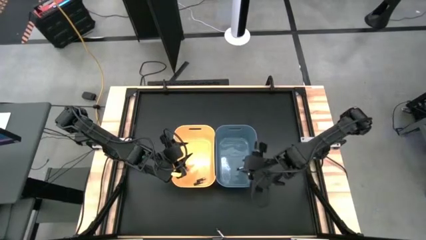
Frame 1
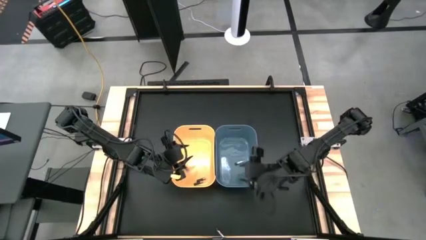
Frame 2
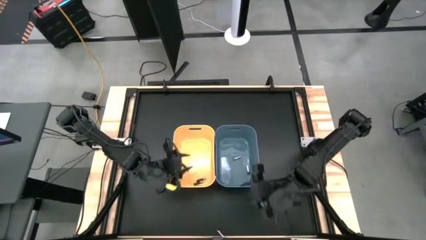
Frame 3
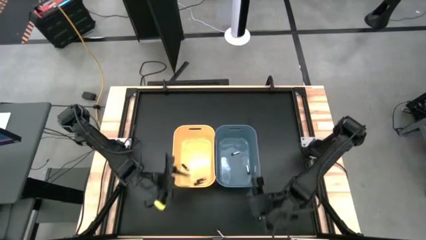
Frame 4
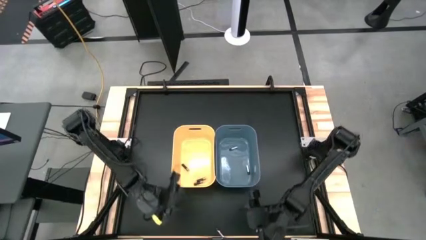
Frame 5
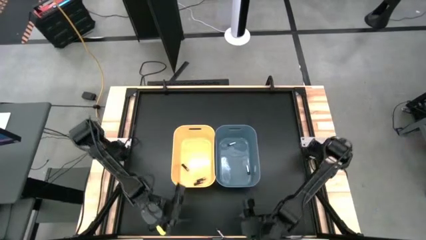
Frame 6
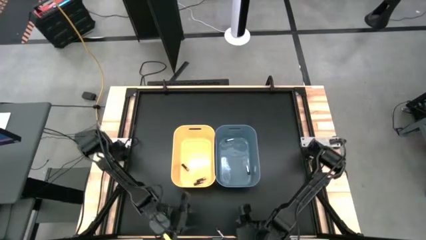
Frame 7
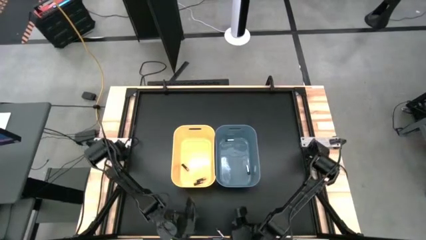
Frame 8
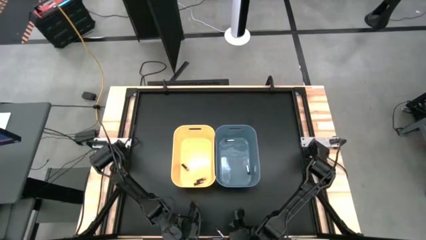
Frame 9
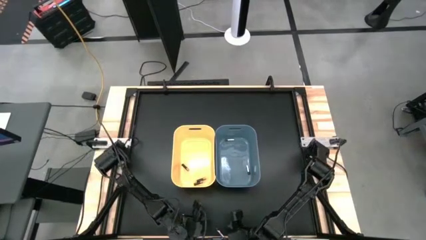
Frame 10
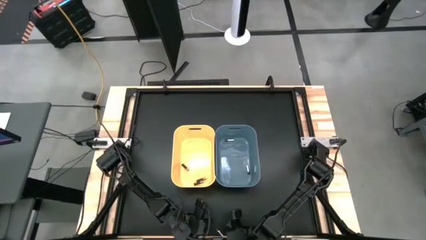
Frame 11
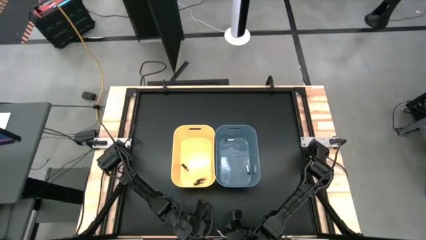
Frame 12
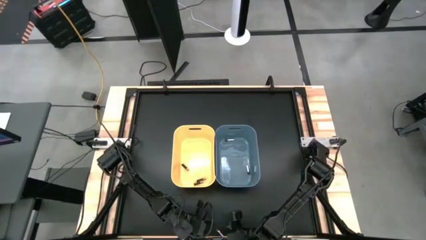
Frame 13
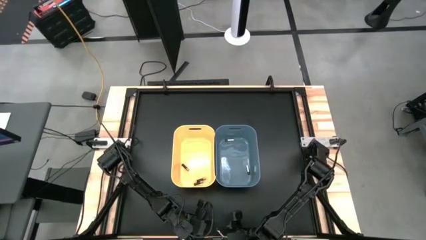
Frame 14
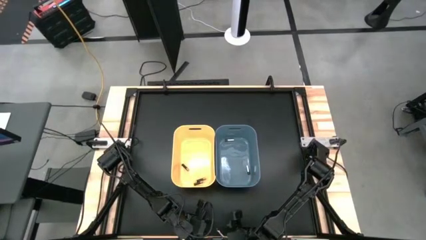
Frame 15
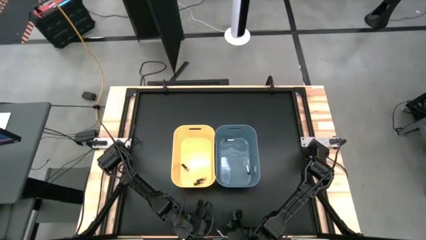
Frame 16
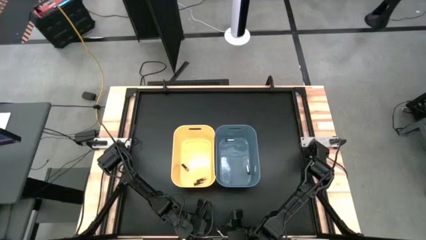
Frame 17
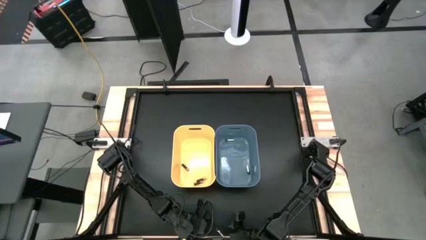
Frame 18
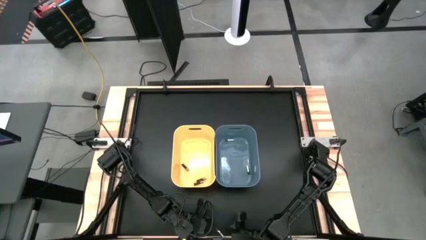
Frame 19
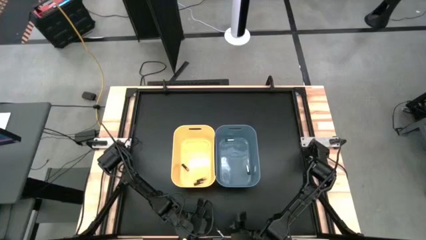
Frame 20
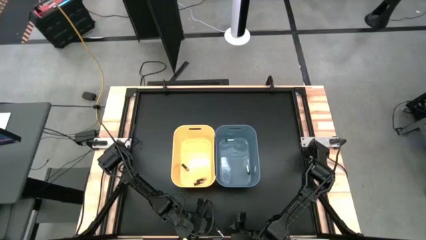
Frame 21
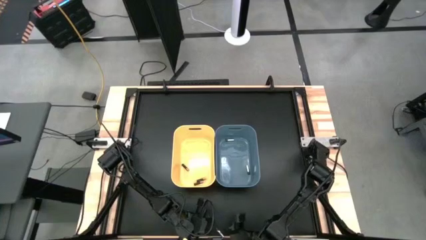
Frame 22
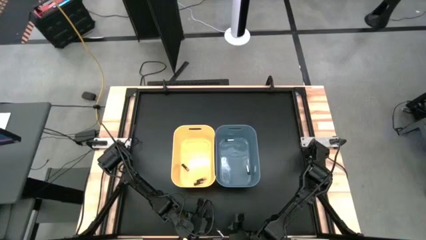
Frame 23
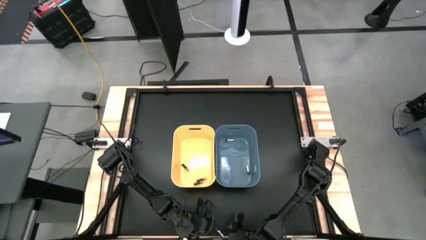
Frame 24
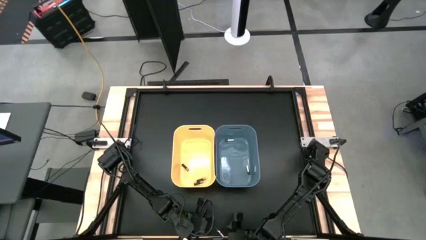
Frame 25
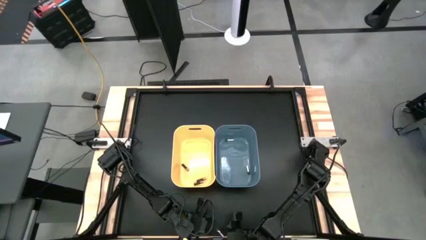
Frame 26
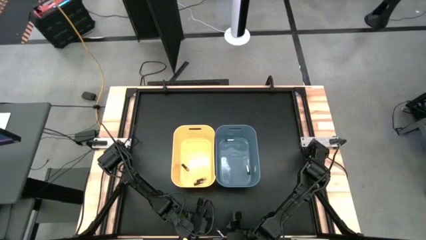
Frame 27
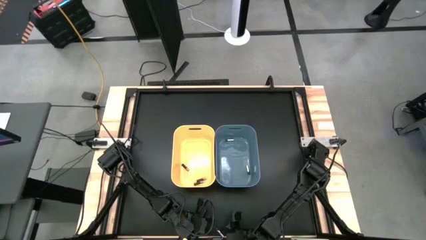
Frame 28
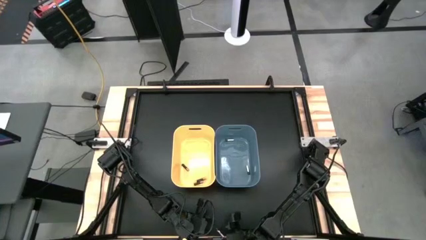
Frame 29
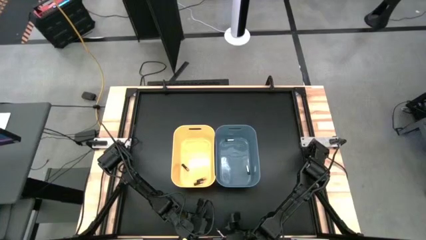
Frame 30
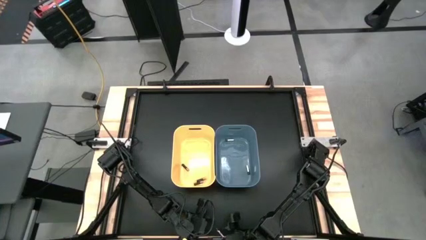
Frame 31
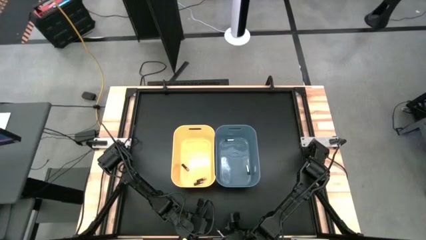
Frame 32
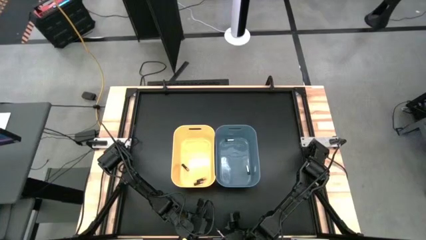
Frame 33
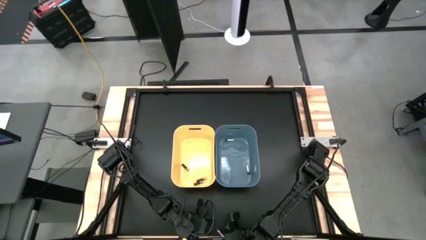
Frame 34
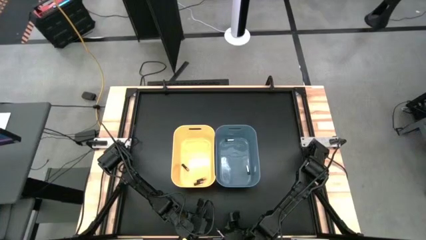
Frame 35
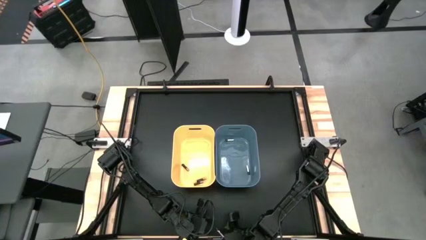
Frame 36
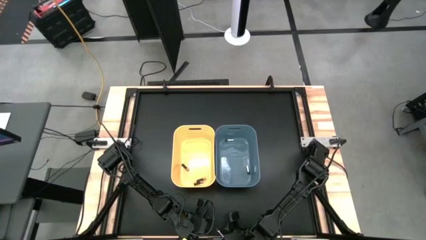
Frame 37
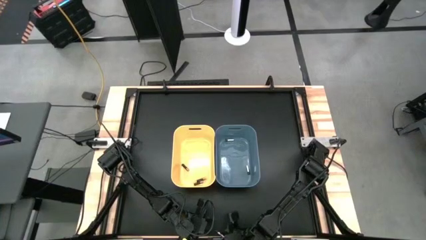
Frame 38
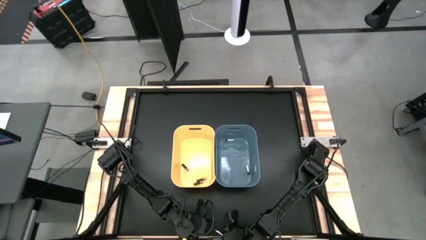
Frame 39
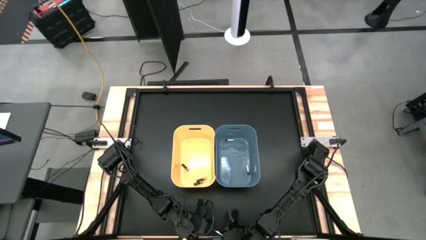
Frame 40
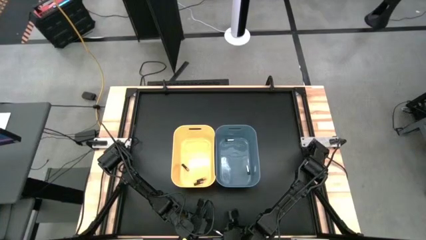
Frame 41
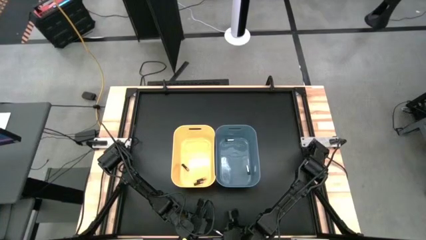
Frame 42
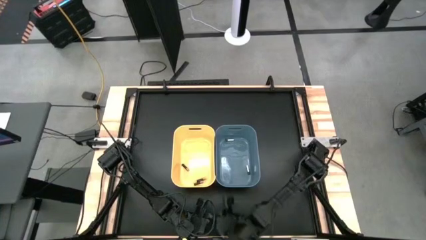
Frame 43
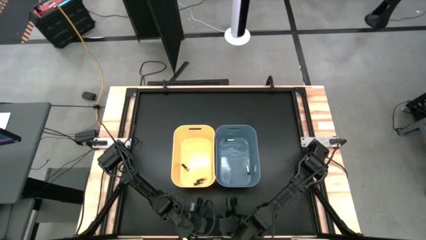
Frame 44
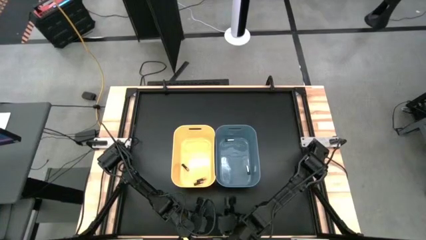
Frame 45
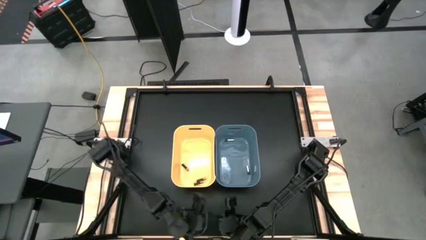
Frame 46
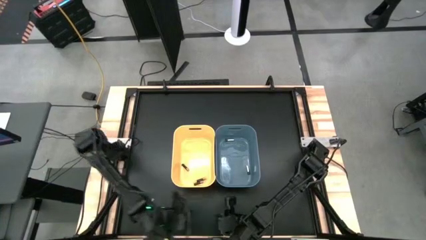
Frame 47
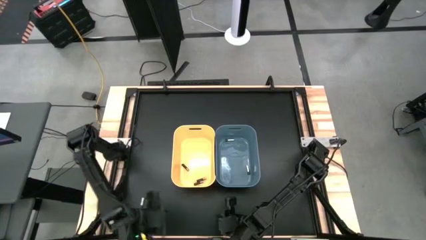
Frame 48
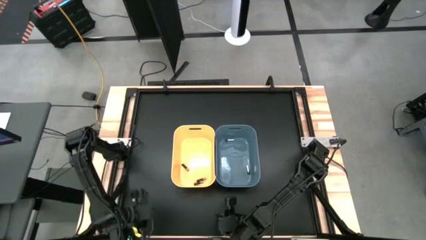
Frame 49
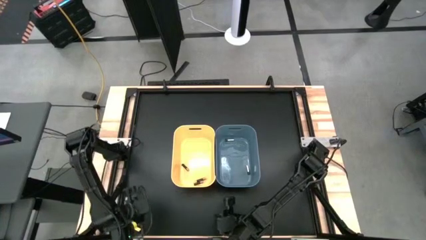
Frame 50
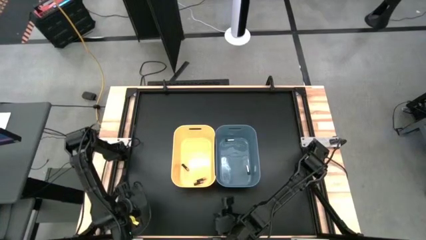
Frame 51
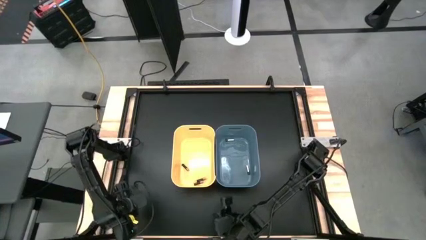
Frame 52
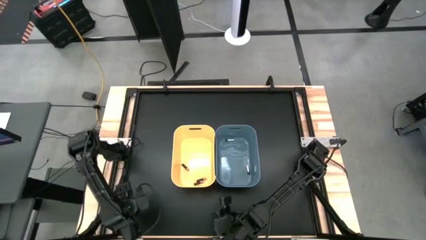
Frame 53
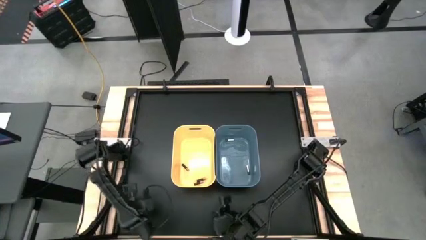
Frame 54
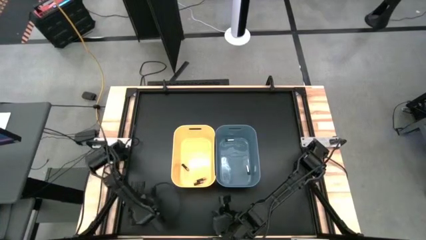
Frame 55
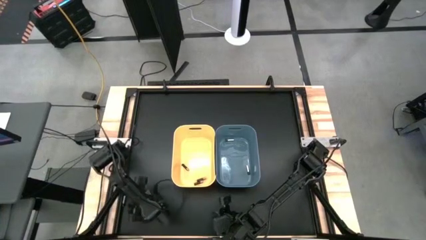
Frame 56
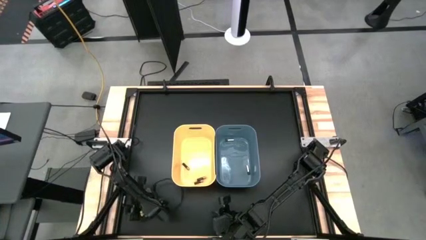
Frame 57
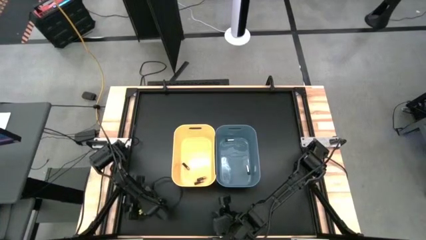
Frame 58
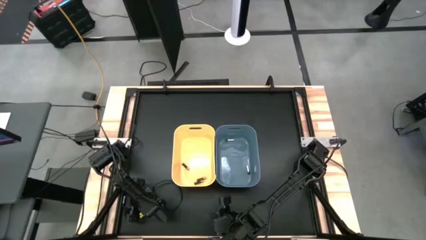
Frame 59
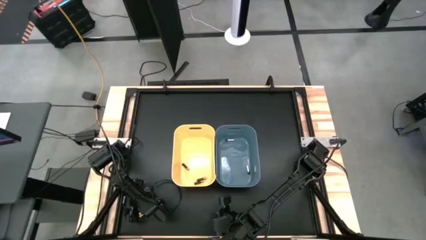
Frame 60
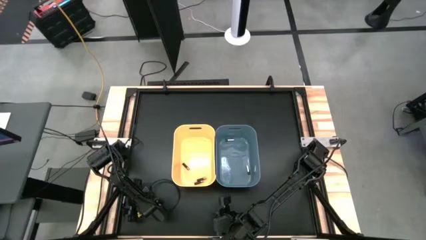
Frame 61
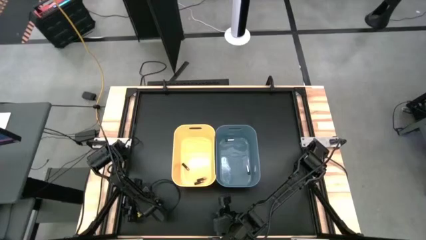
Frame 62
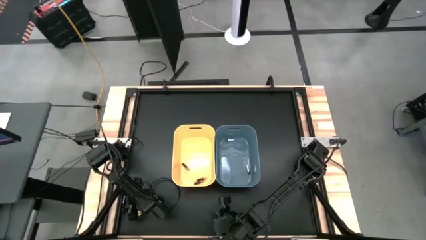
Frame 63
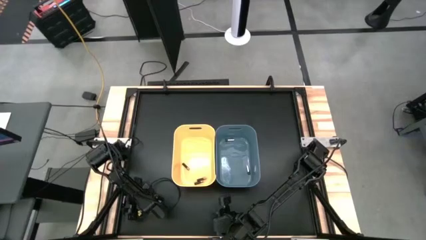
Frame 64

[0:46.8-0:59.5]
Task: Sort batteries
Put the silver battery into the blue bin

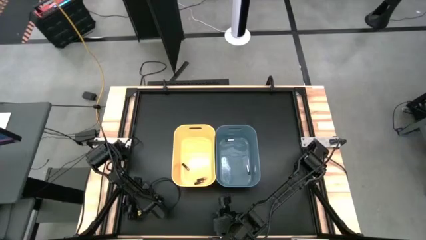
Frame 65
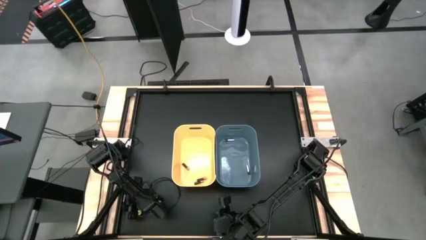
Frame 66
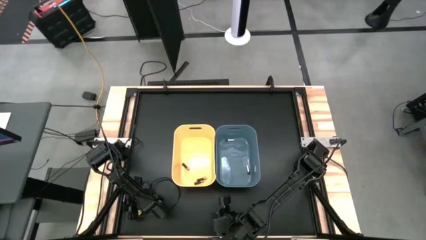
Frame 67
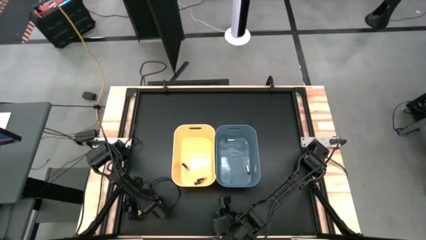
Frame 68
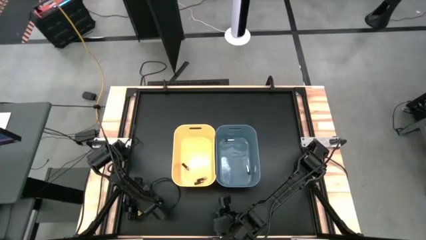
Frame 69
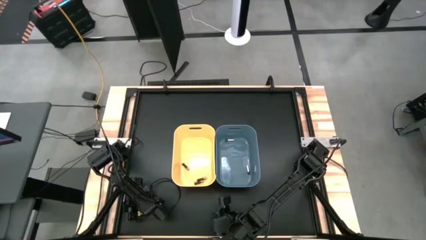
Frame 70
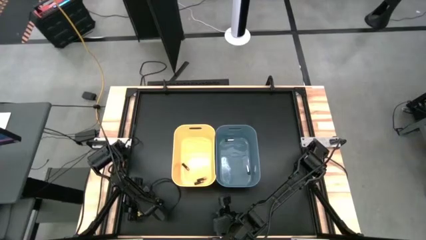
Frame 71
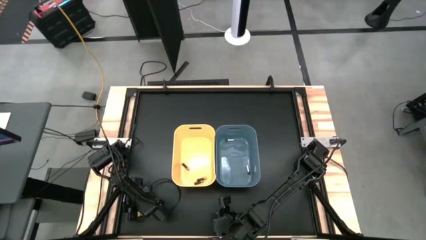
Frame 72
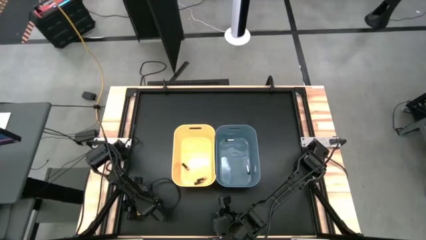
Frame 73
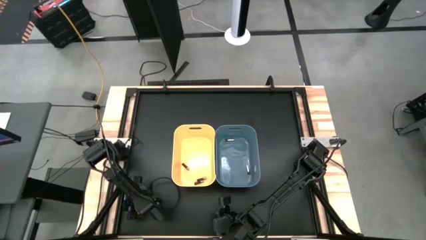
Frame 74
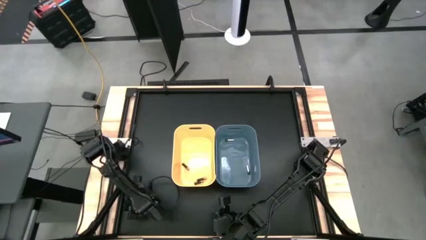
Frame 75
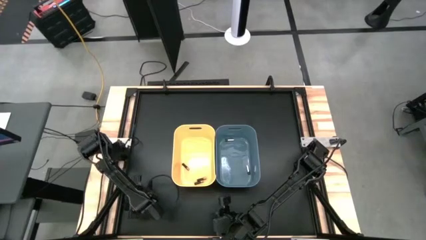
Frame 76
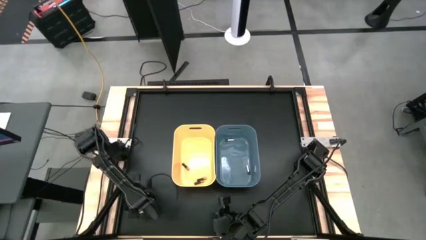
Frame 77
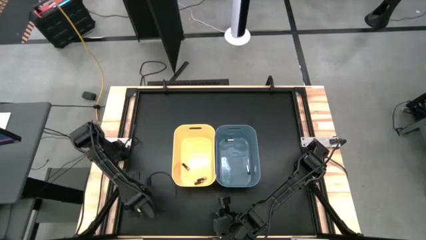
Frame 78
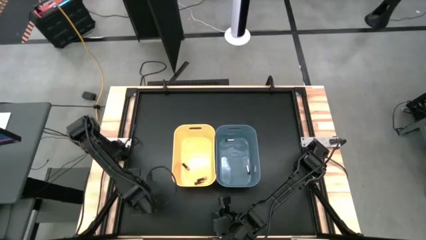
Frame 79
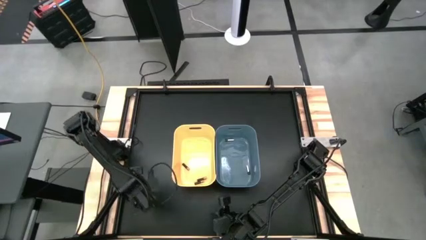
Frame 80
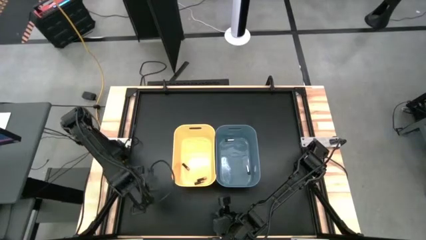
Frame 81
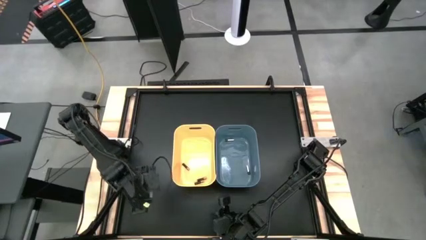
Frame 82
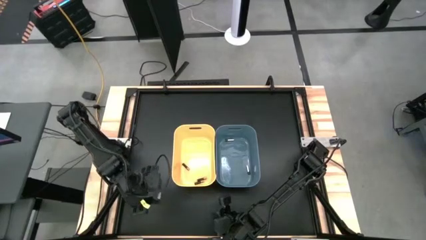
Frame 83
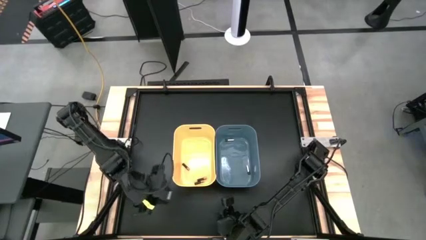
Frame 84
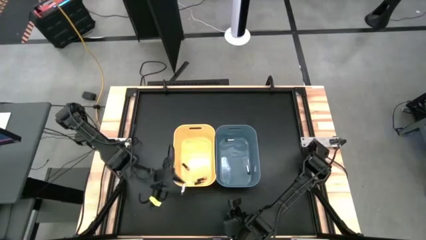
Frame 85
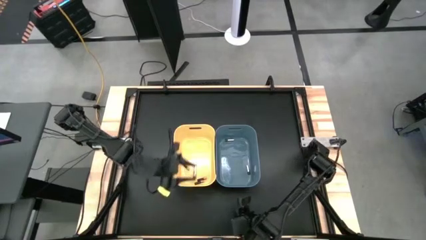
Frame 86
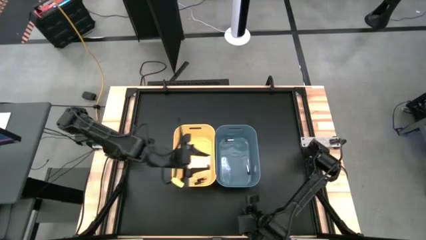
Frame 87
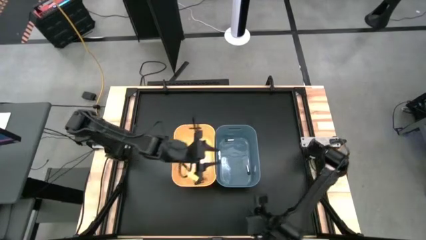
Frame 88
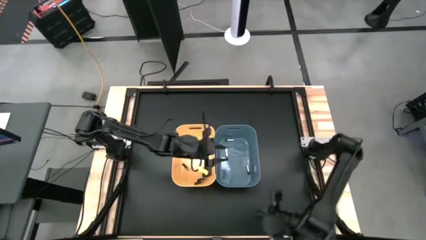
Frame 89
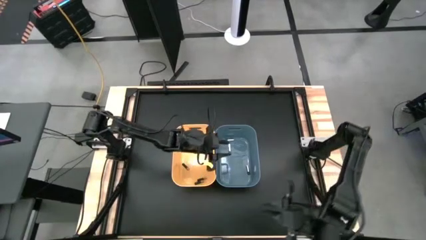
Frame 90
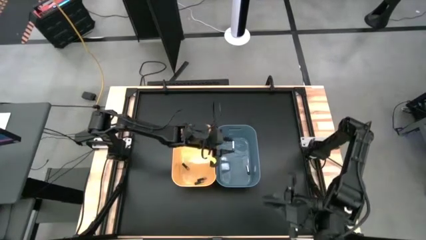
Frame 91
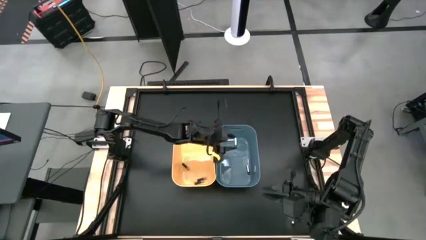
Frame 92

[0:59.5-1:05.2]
Put the silver battery into the blue bin
